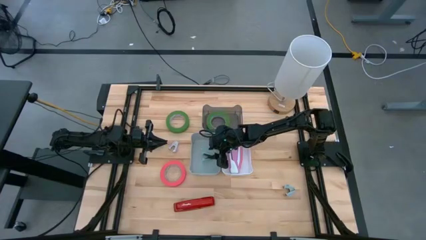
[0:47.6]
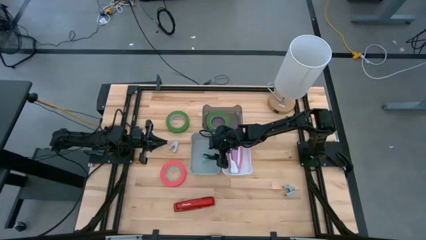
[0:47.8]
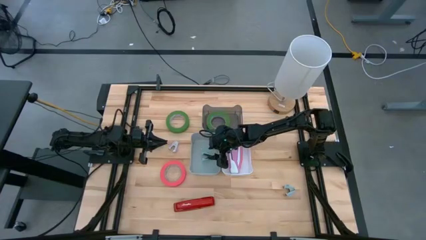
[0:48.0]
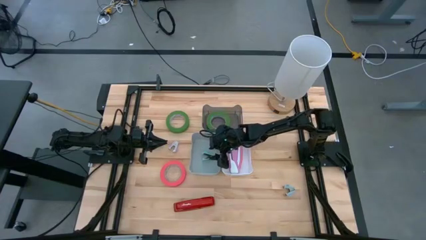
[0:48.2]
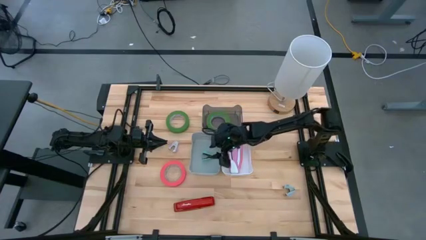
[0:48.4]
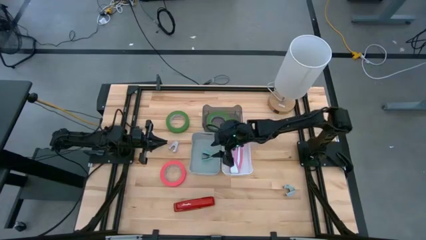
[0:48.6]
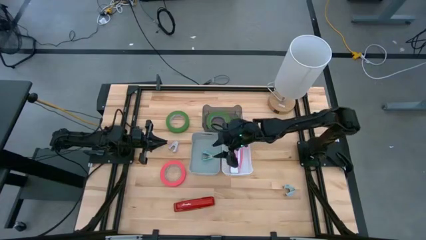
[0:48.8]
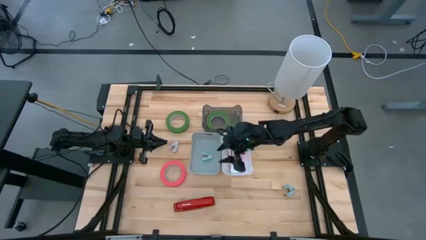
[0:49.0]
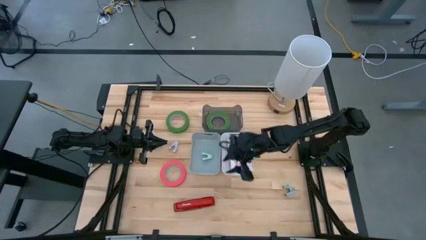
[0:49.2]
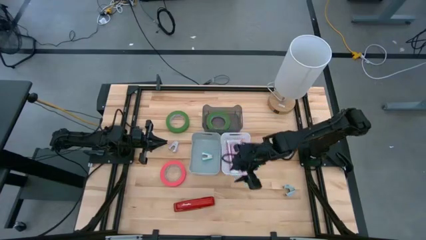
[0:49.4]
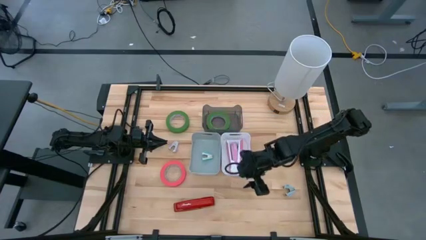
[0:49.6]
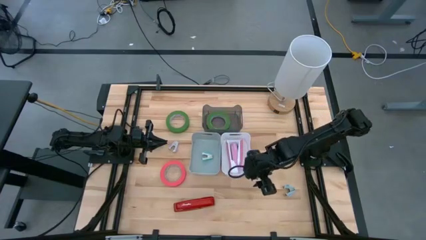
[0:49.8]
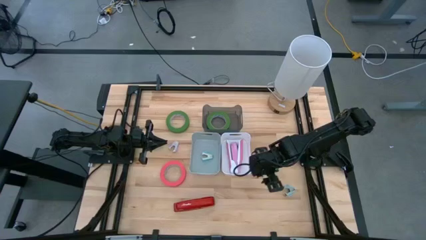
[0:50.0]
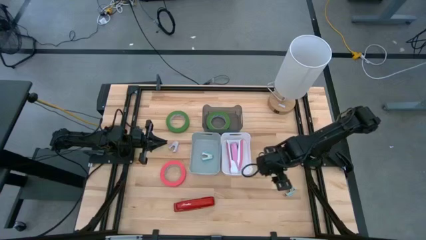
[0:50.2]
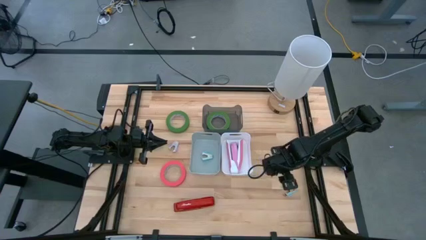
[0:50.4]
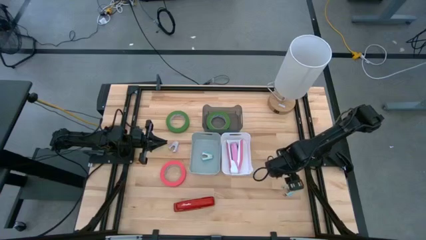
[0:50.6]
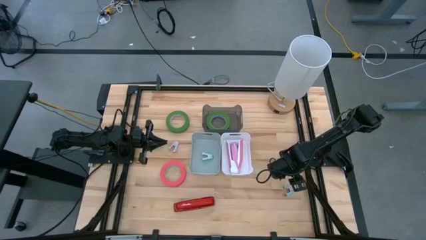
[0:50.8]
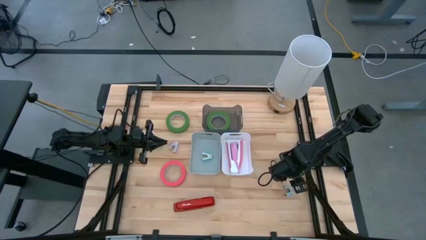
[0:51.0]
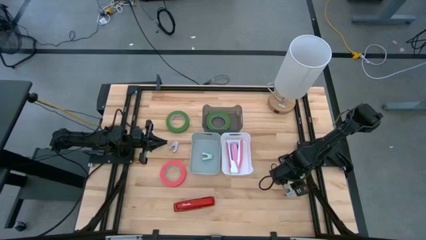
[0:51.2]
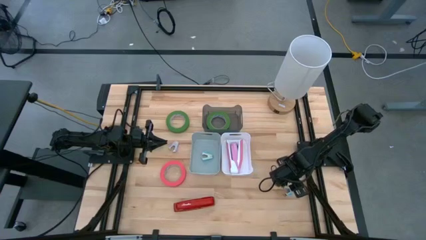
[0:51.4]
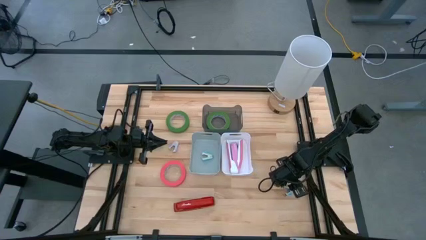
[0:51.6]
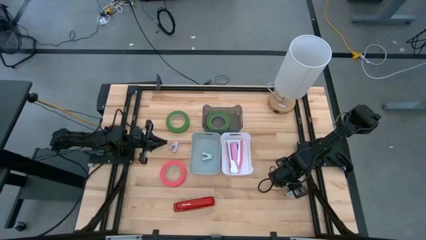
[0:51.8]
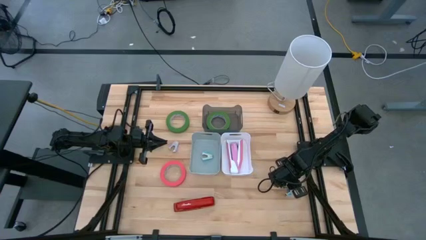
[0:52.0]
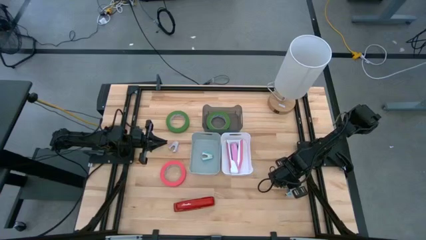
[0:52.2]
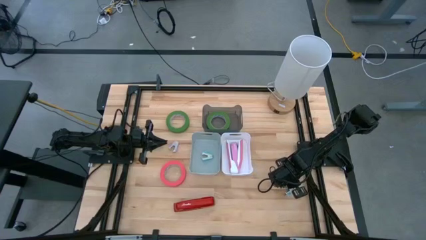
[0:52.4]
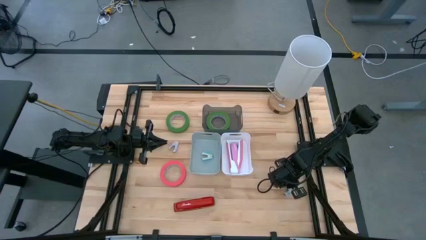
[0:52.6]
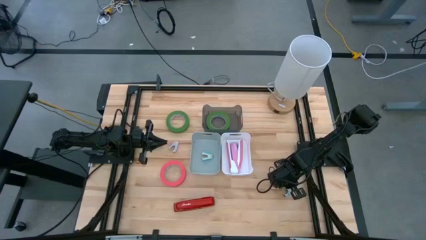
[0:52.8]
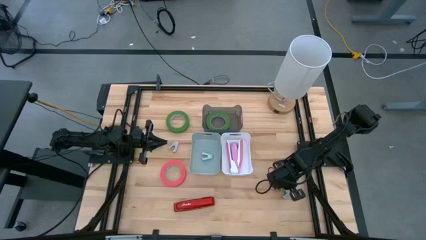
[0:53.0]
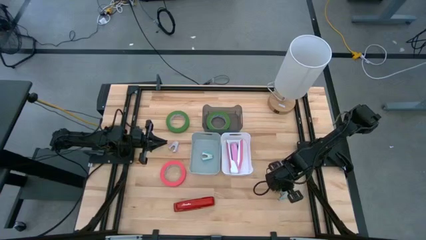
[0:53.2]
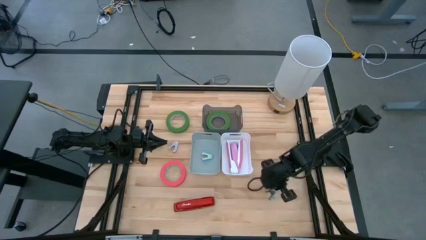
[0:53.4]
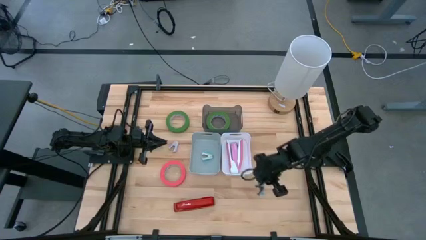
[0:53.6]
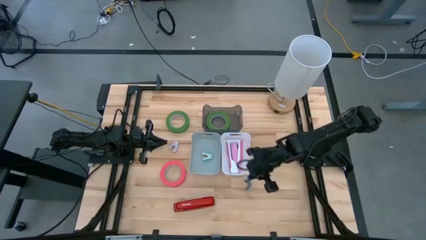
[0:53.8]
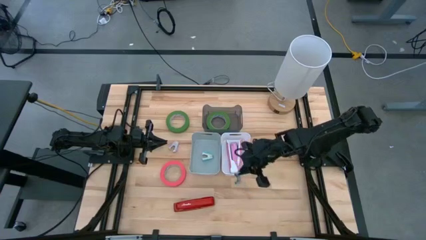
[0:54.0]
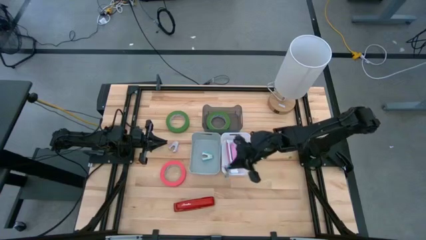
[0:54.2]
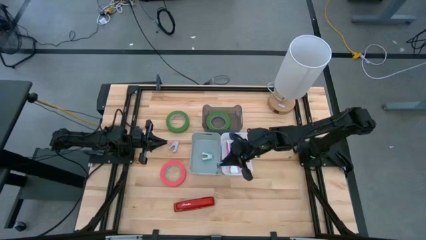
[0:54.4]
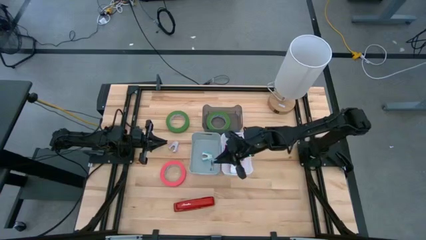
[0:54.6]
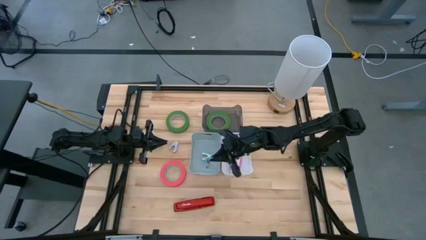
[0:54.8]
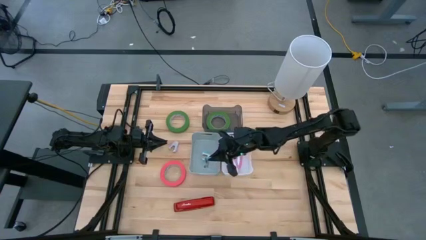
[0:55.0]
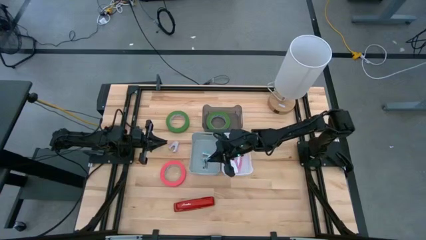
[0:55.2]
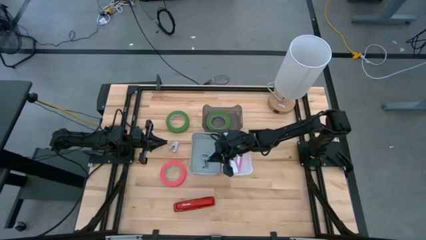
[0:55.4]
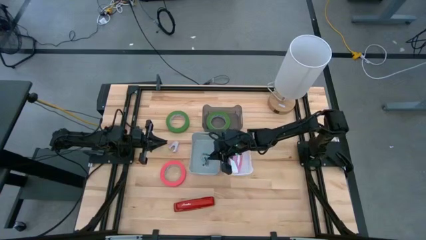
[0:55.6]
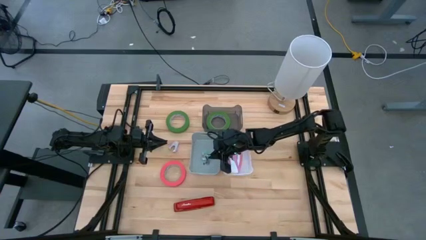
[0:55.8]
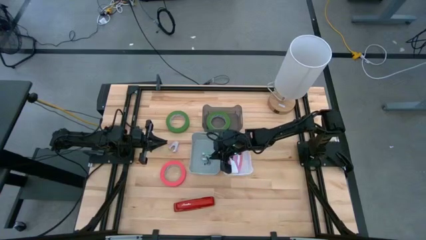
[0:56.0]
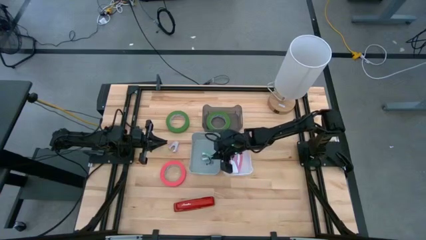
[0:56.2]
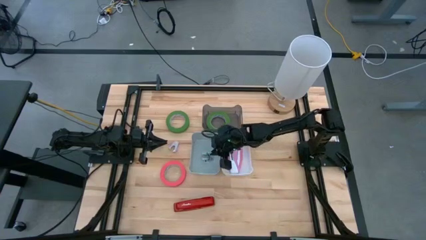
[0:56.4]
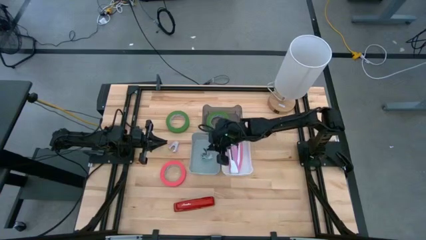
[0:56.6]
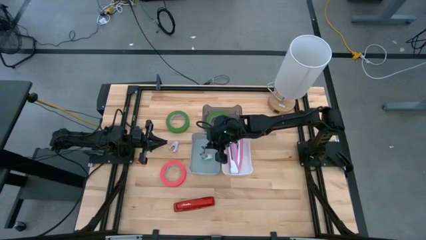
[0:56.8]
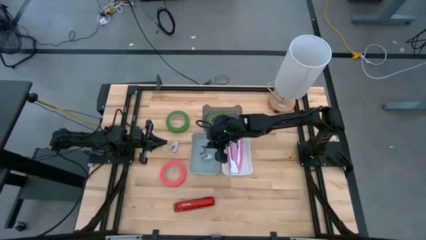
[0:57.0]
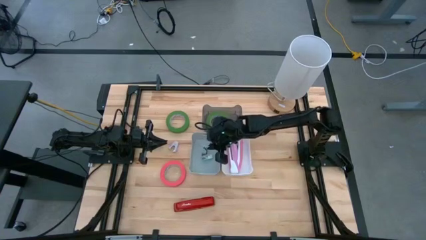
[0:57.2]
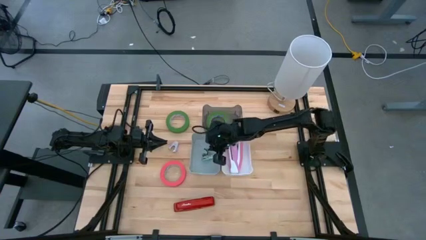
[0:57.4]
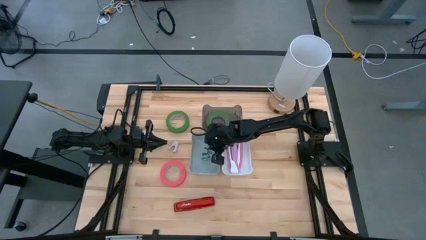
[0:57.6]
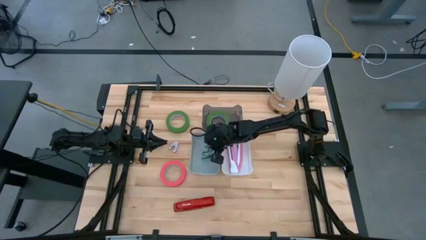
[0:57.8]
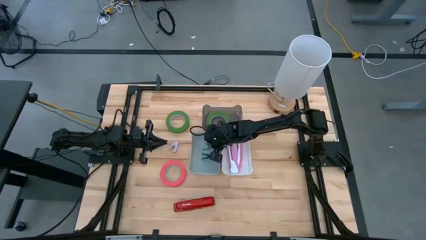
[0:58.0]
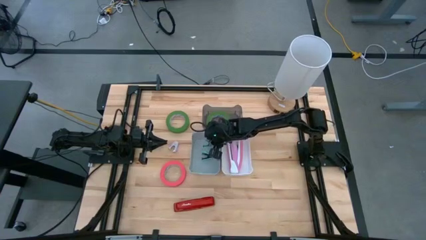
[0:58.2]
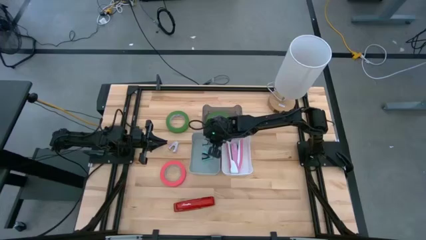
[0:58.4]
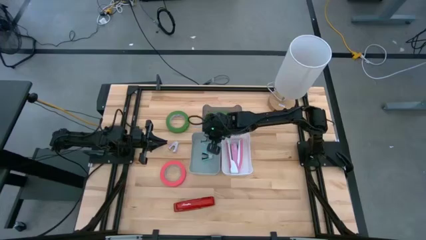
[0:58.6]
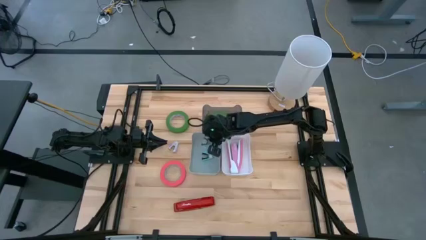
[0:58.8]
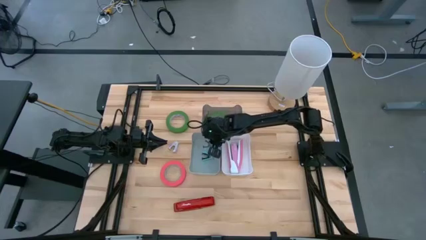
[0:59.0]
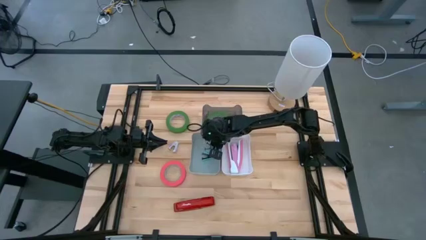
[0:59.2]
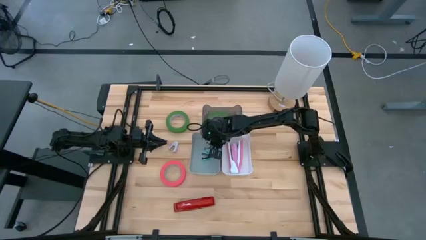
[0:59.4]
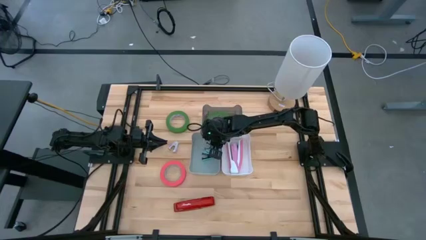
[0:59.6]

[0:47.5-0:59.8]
Task: Pick and place Stapler, Stapler remover, tape
Put the blue staple remover in the gray bin
